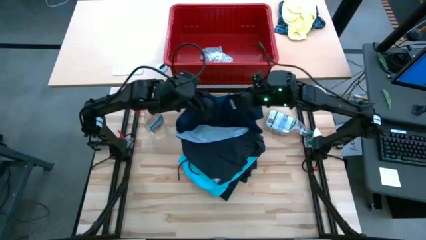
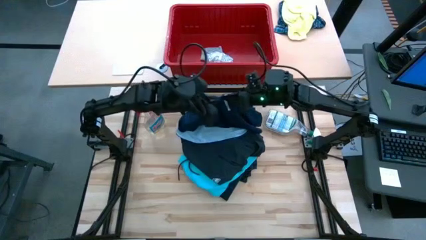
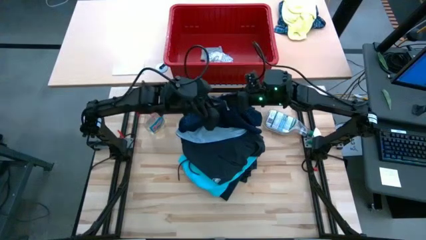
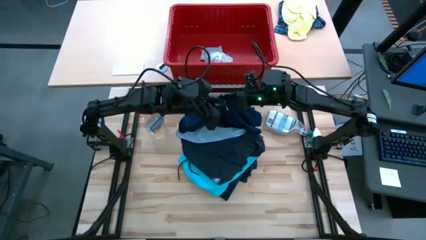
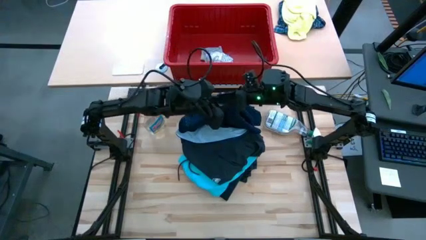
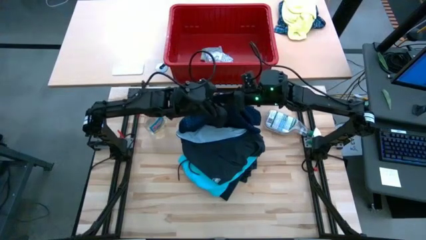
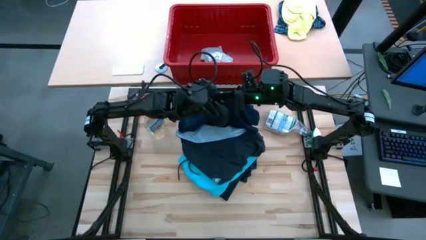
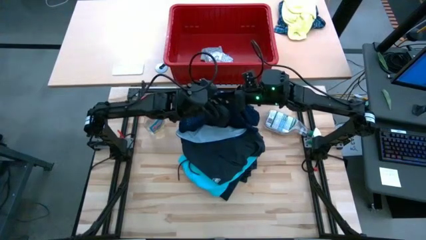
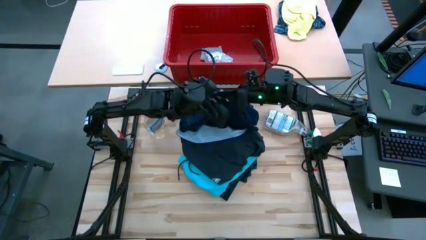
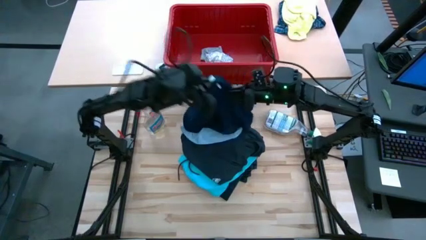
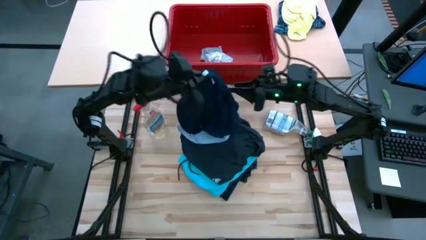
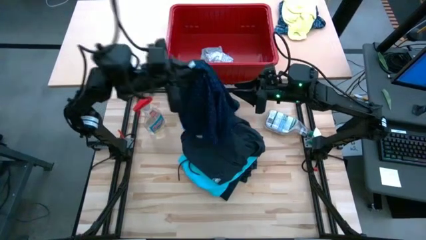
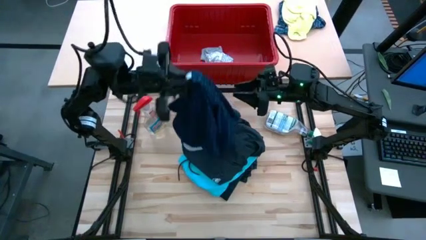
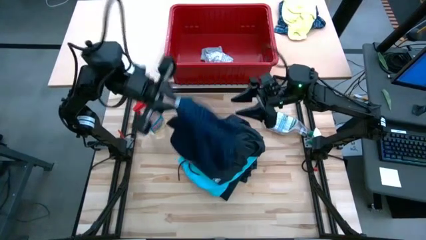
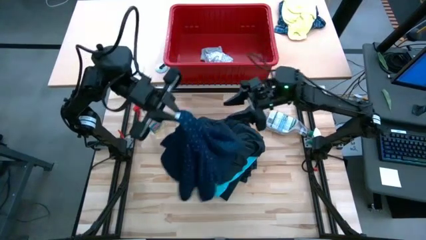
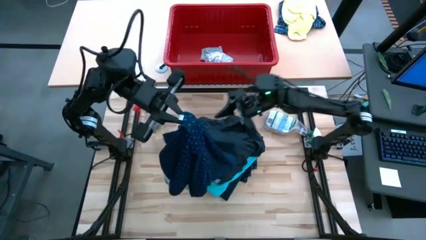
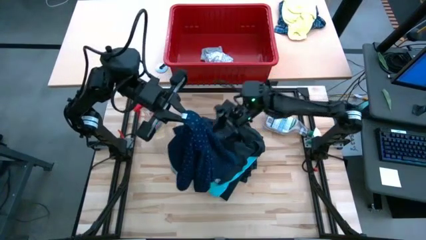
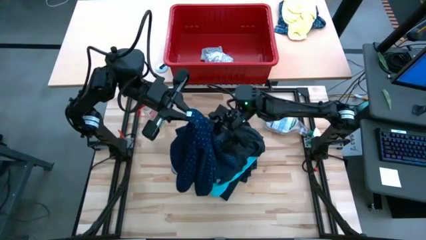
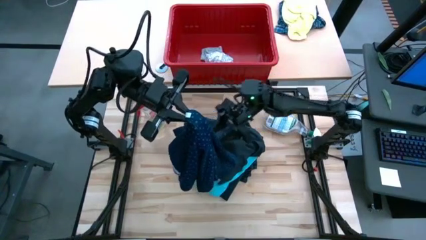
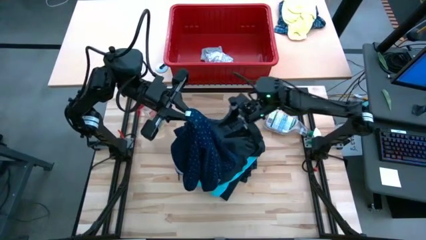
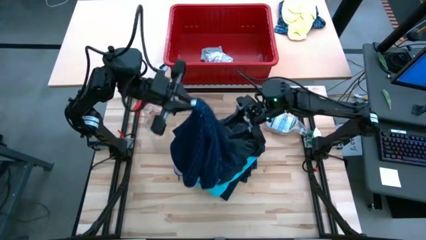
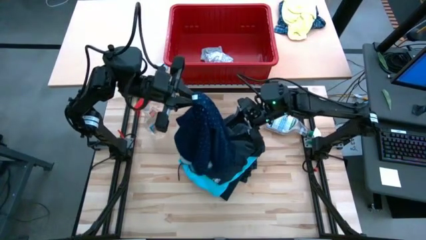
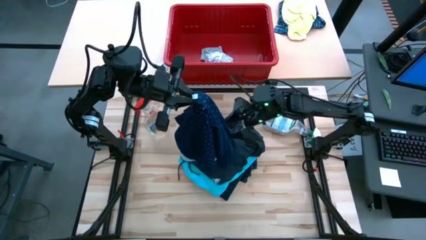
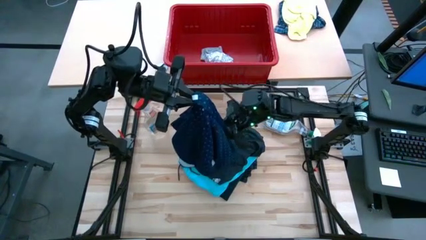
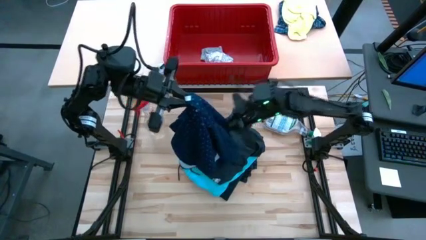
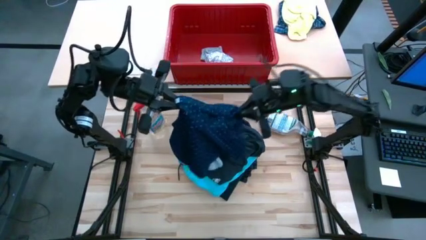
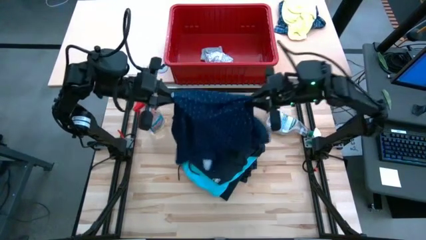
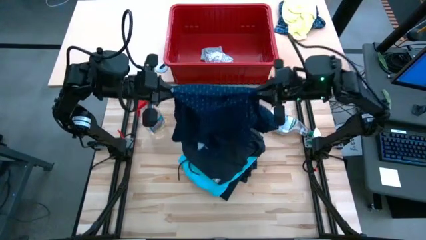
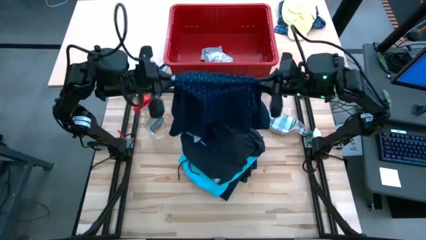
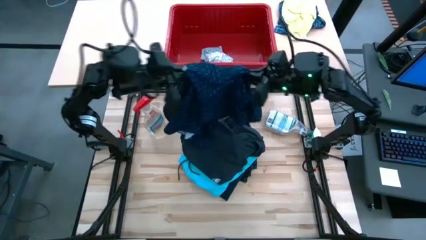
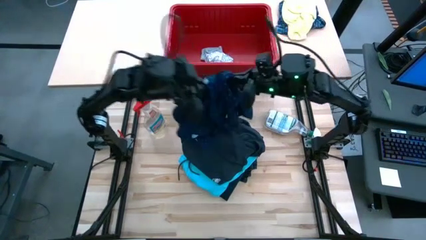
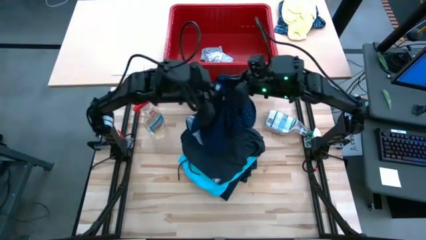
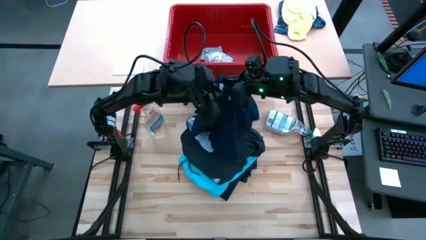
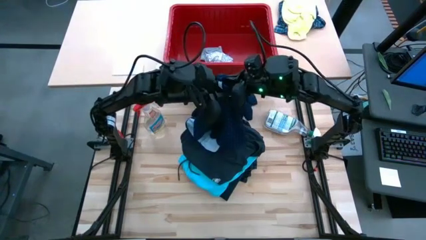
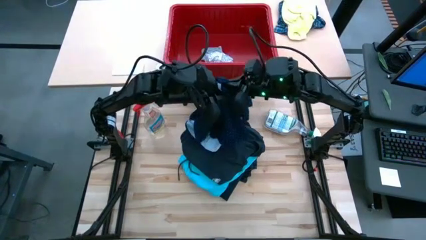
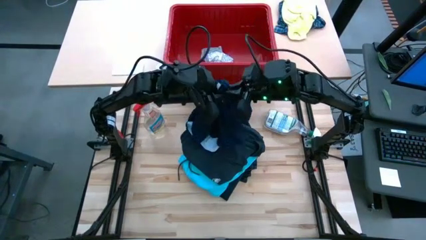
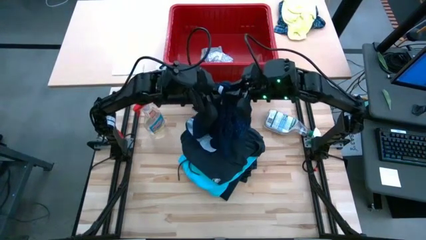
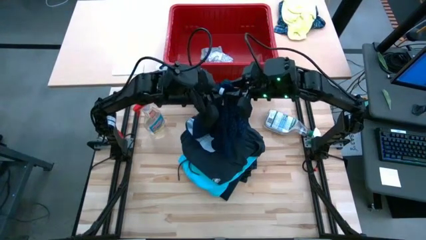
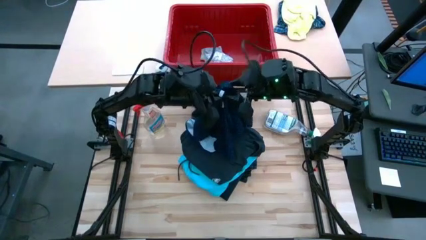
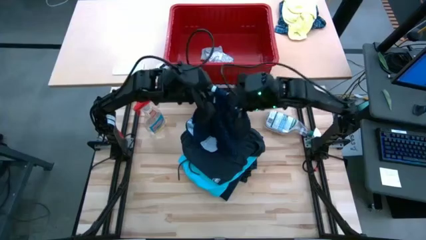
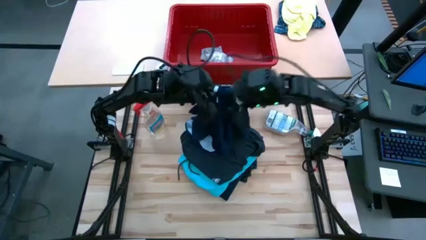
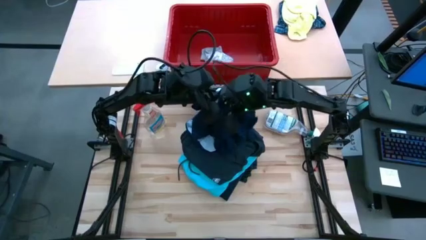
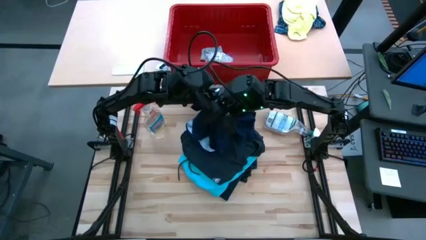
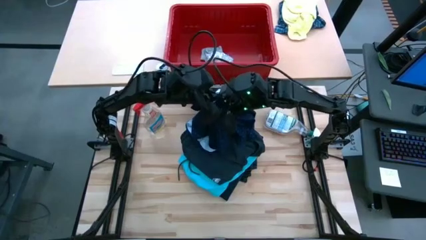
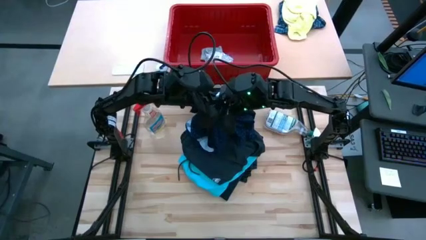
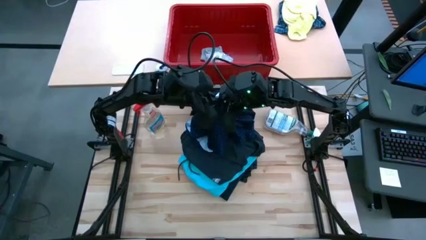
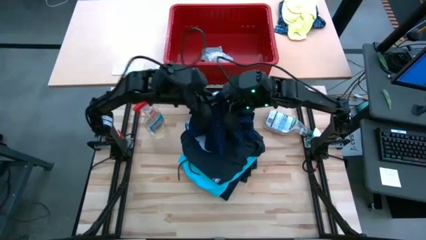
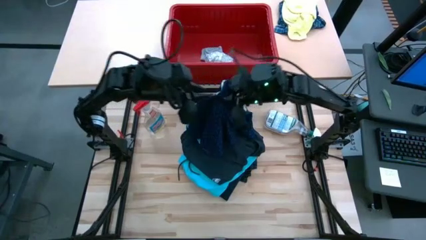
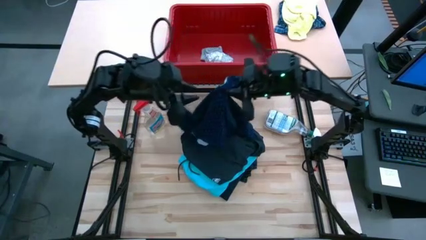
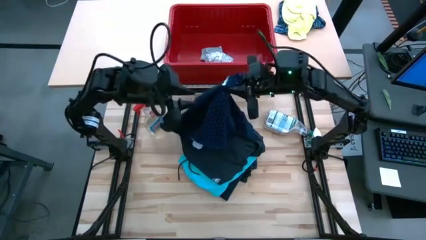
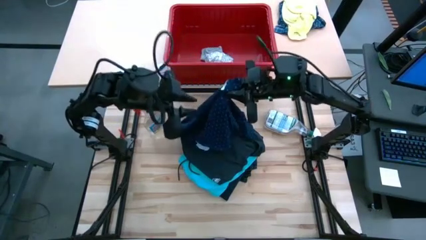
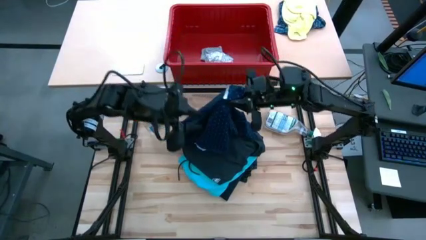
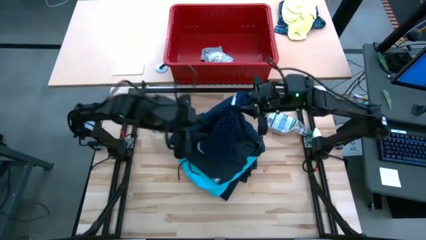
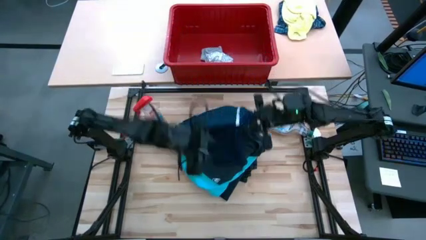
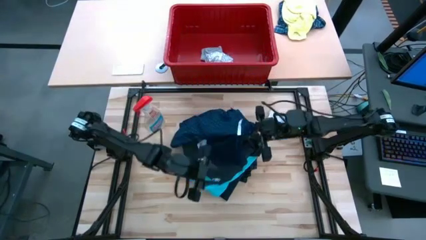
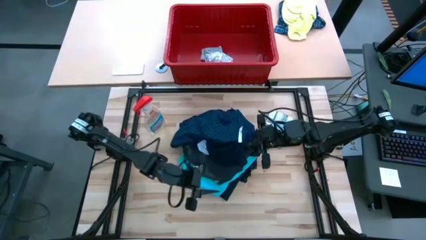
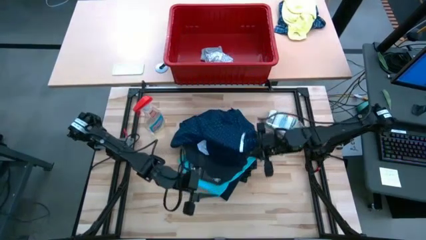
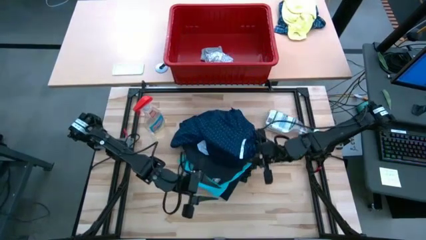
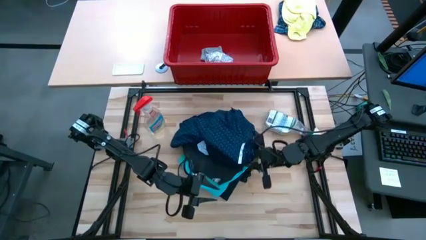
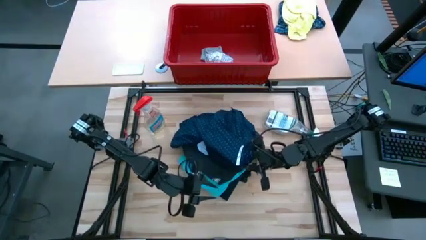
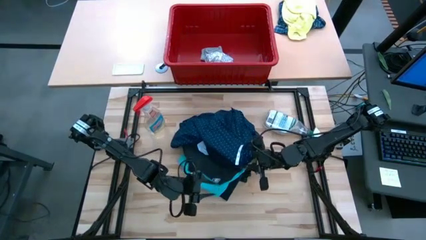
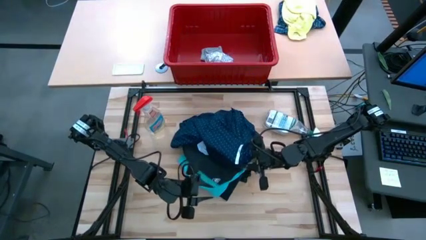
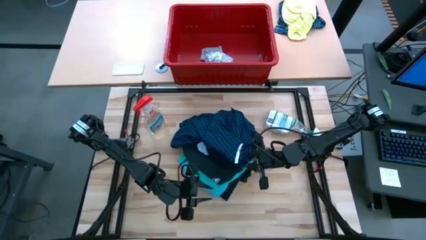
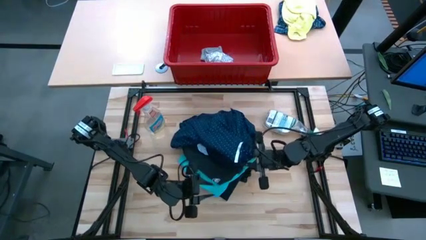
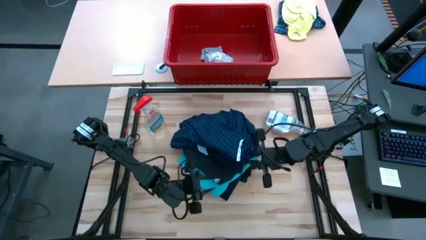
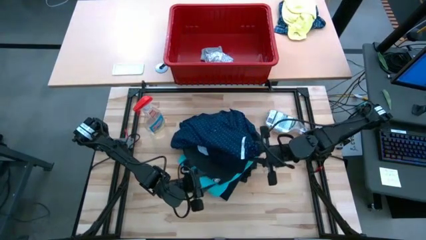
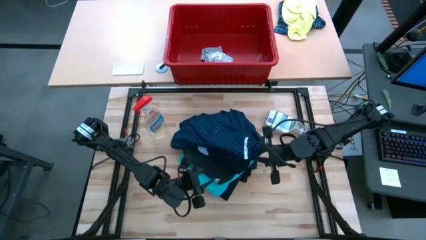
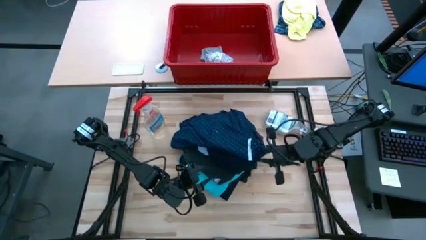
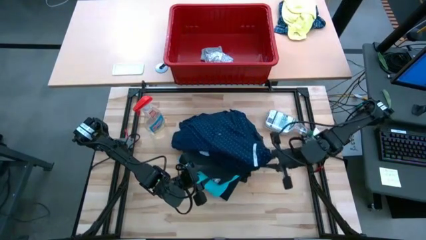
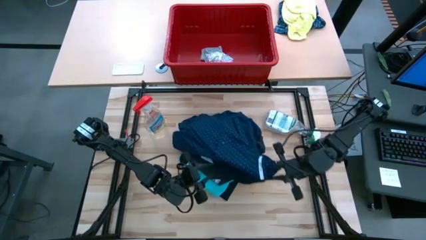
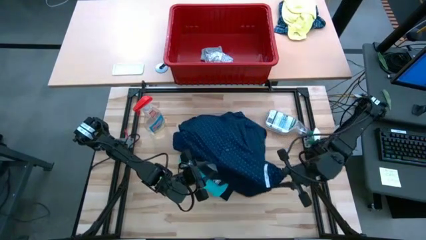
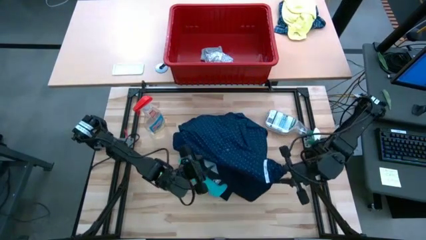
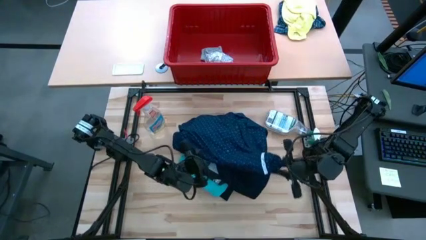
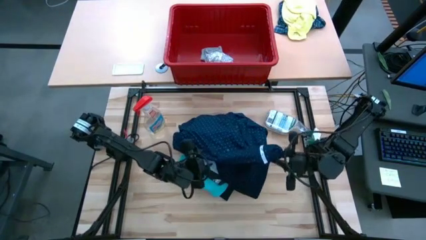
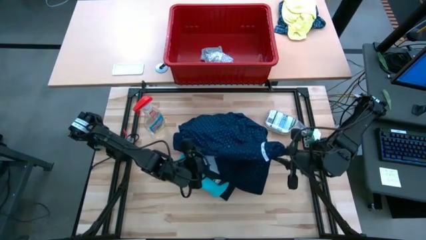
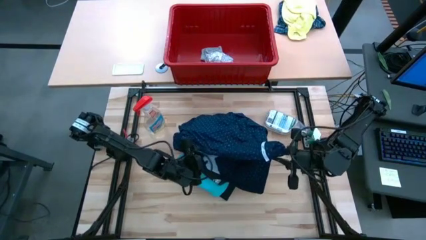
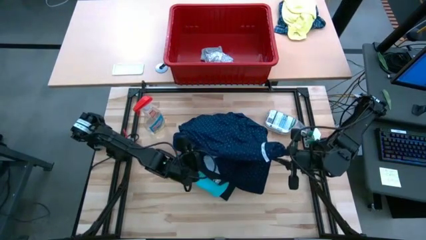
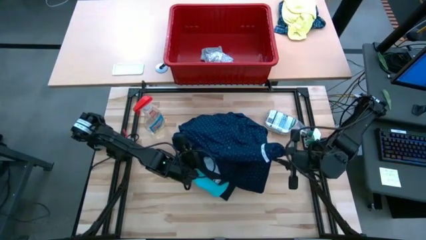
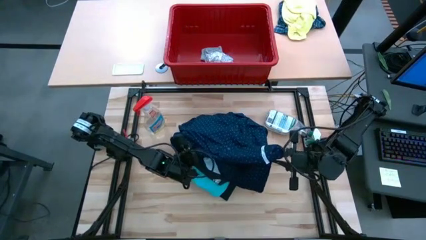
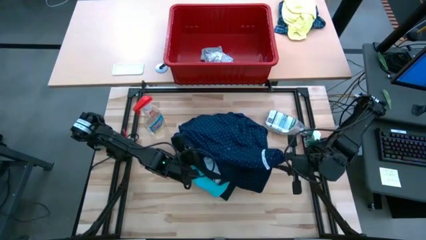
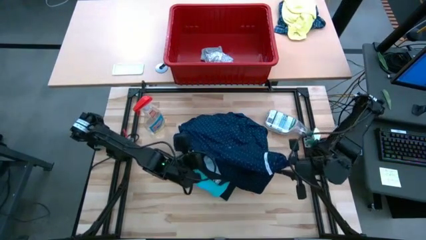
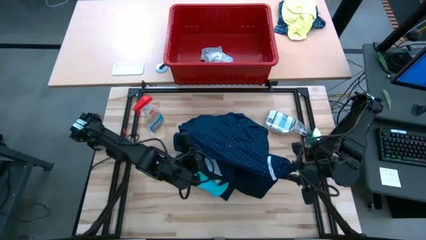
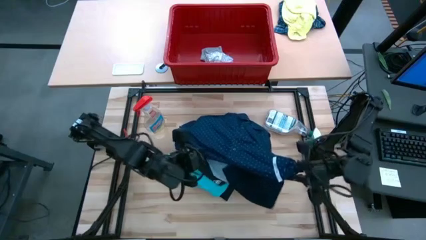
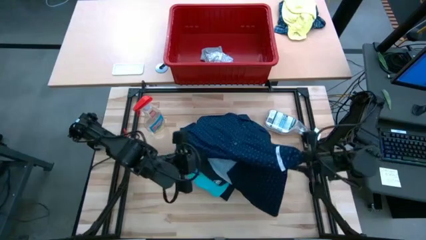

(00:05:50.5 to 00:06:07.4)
Task: Fold Laundry from Bin
Fold the blue polo shirt
